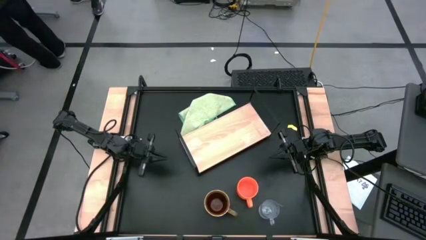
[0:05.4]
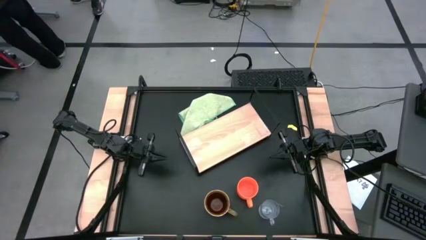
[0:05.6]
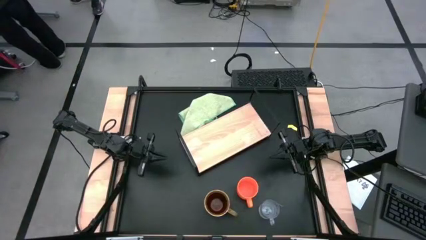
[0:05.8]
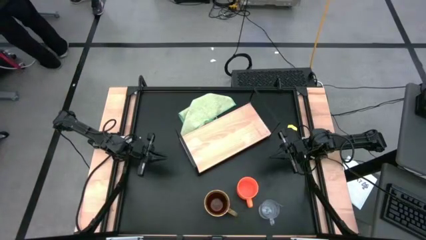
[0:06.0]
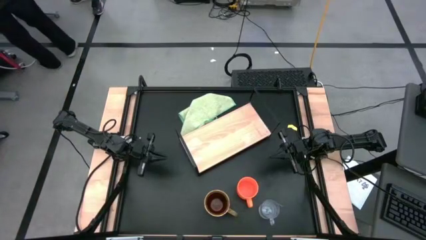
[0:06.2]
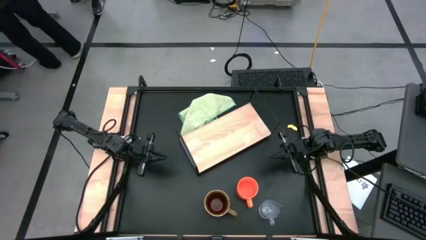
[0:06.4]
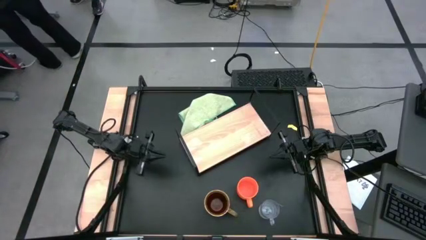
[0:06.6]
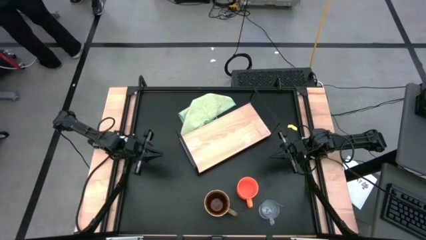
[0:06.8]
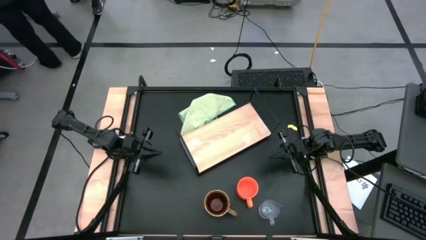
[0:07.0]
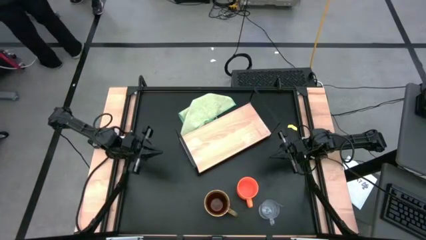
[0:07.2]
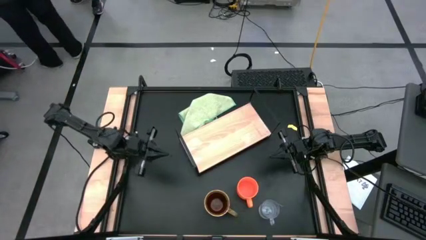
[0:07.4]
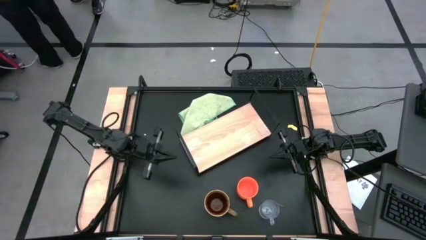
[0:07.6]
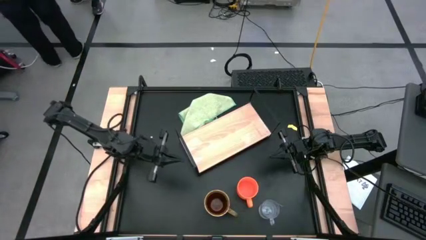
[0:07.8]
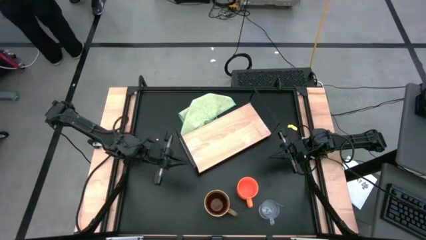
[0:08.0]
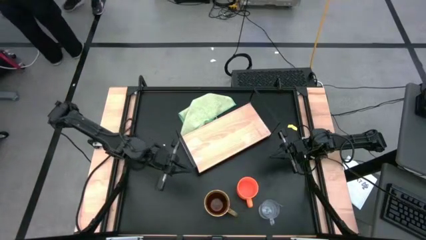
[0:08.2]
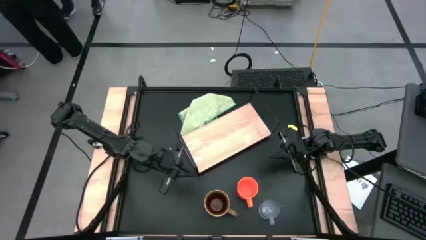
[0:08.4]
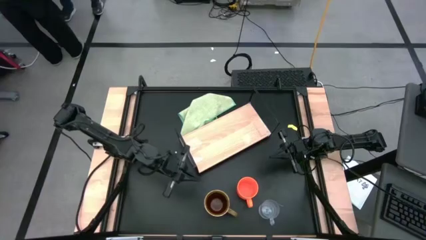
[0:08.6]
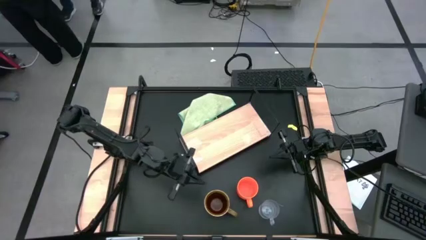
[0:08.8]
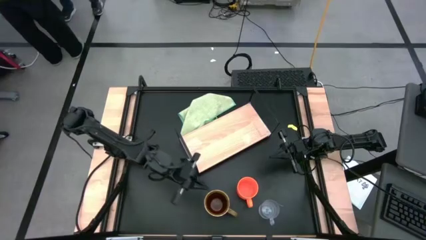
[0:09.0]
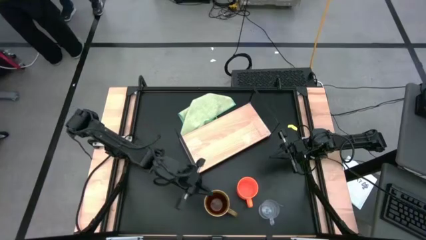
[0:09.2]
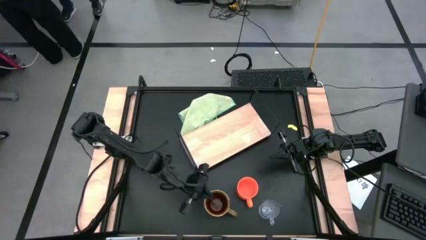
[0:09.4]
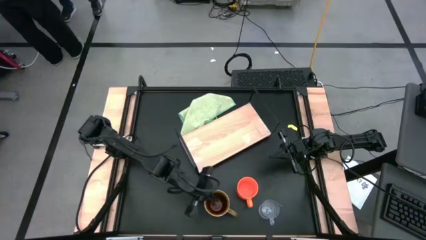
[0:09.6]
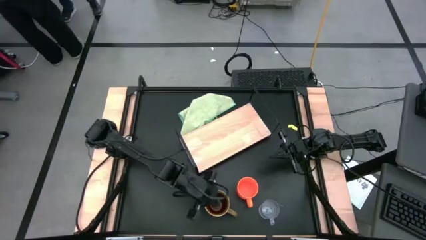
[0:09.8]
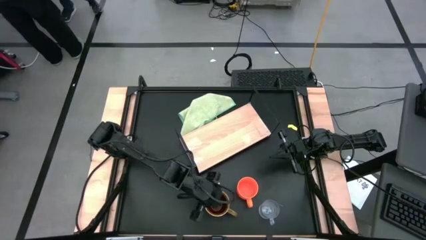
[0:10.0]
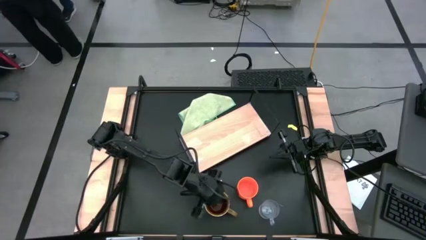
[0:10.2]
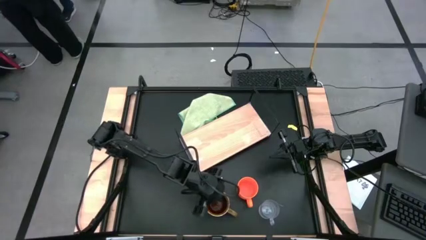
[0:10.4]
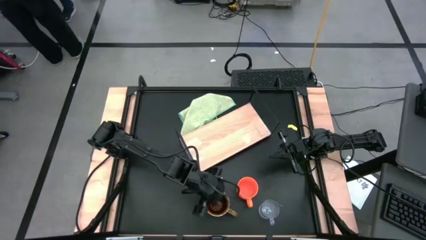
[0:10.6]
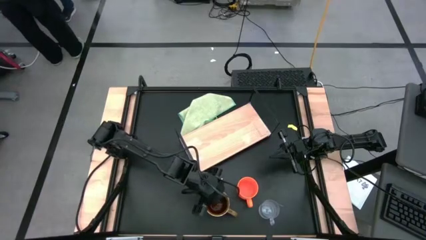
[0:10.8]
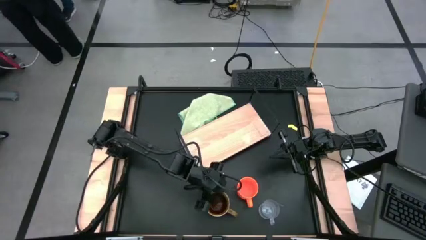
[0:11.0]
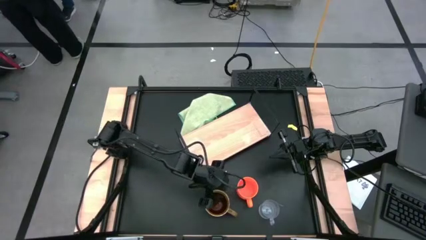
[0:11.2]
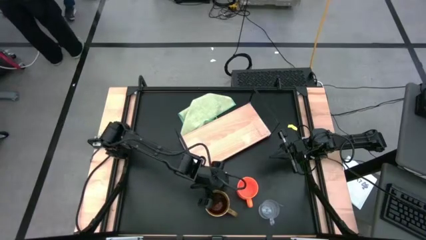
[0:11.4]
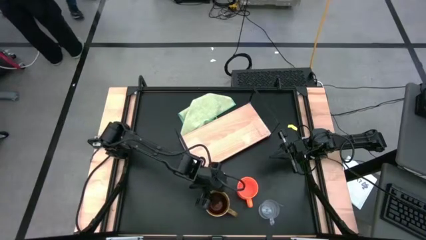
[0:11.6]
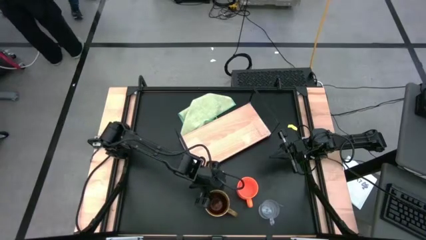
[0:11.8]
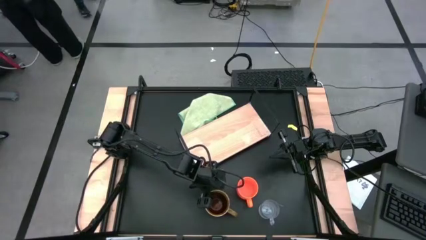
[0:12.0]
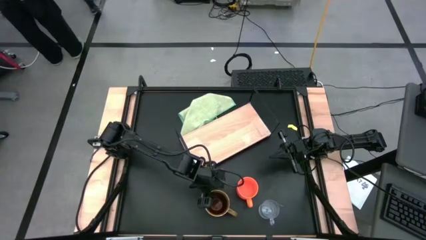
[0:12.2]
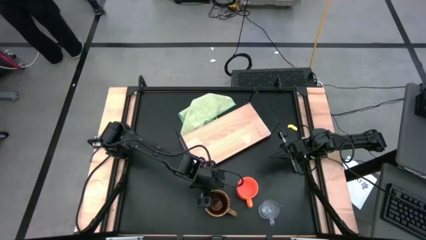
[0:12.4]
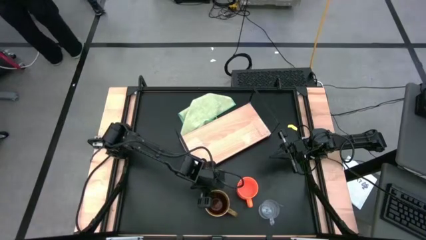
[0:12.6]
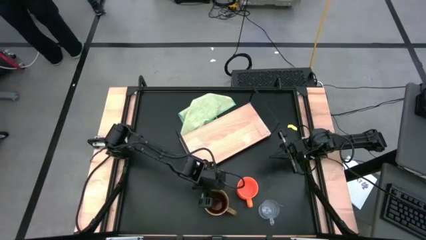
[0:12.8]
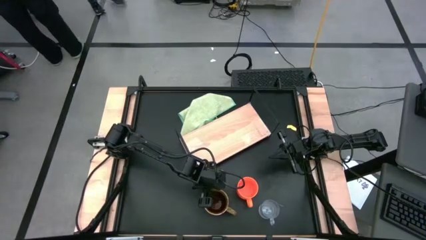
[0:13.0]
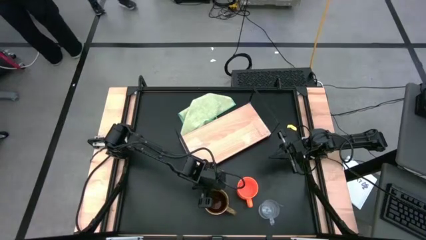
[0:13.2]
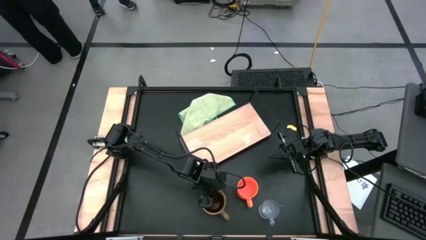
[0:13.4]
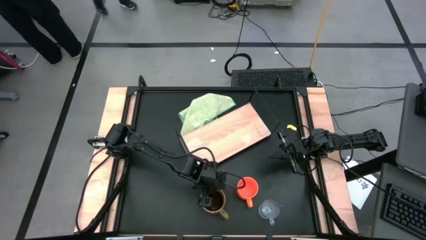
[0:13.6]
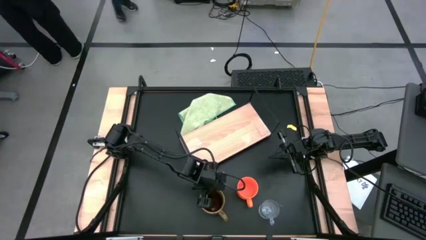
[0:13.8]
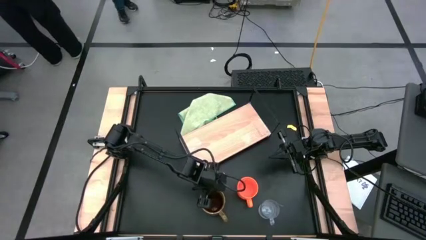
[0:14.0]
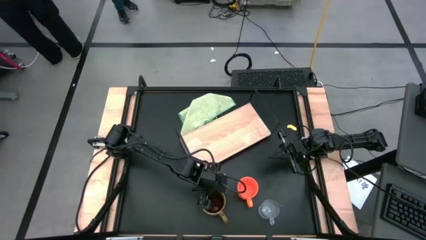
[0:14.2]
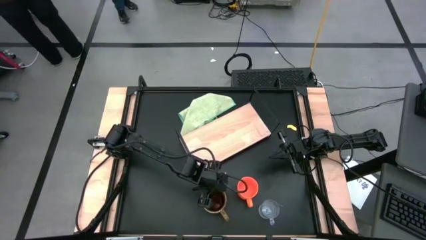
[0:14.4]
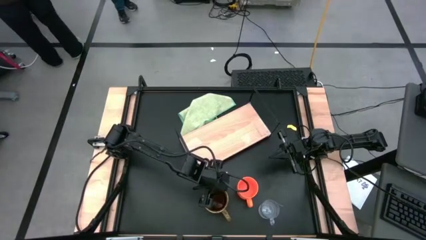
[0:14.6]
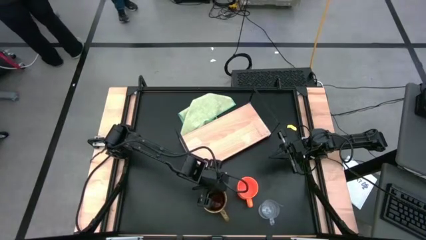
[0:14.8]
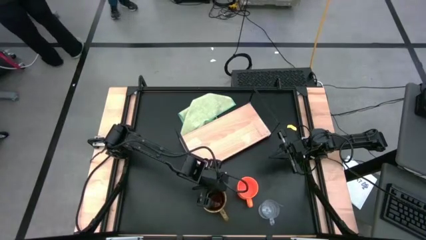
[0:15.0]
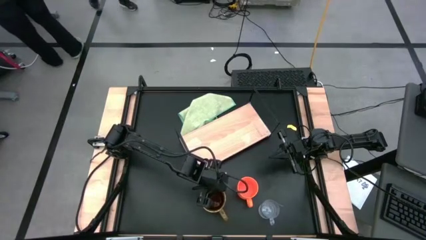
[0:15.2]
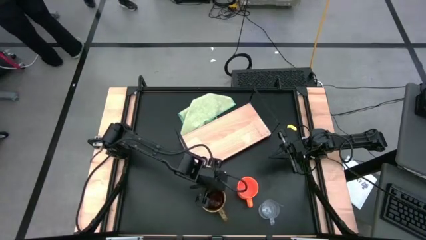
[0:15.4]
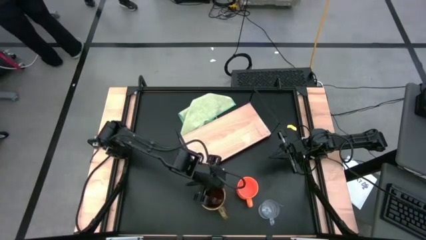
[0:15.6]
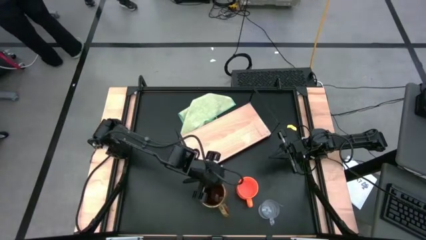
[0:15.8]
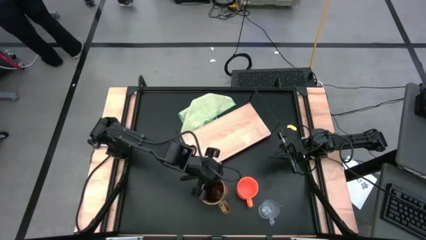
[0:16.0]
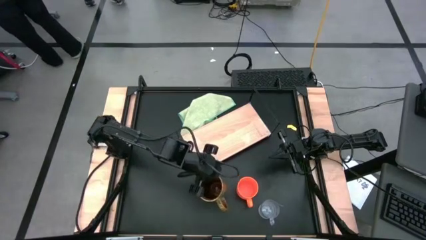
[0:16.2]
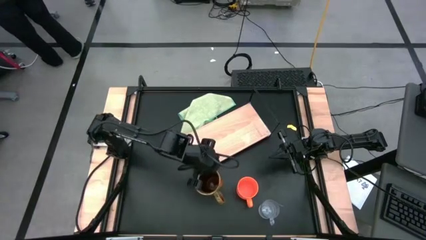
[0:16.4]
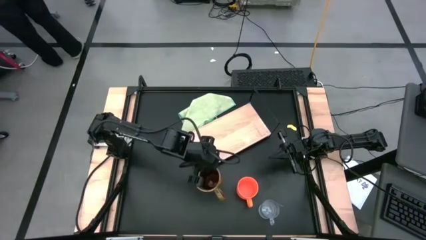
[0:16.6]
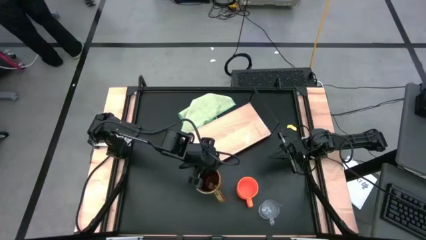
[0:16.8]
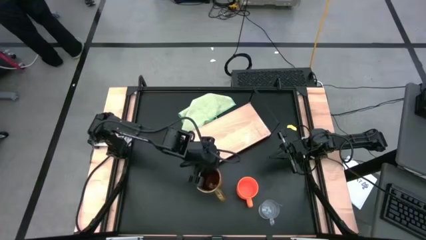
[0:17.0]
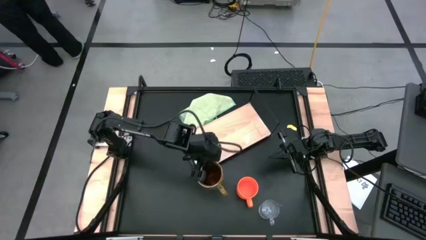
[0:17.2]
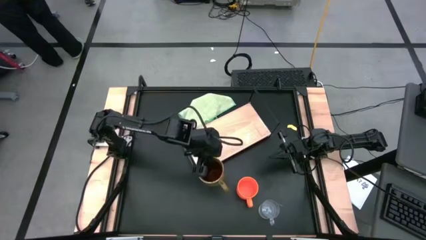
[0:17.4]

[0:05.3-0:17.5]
Task: Stack small to large cups/mugs on shelf
Put the green mug on the shelf

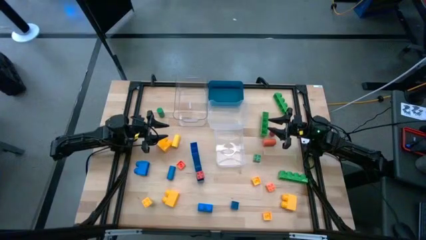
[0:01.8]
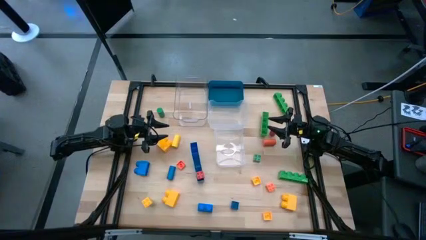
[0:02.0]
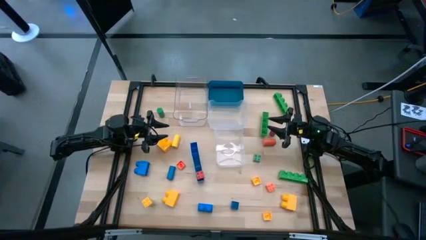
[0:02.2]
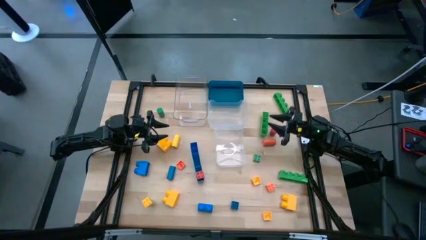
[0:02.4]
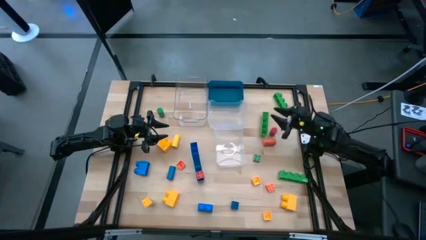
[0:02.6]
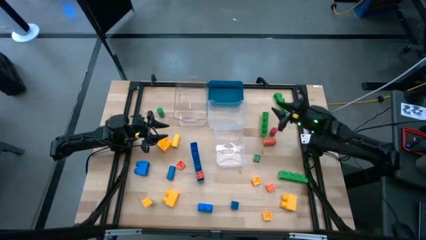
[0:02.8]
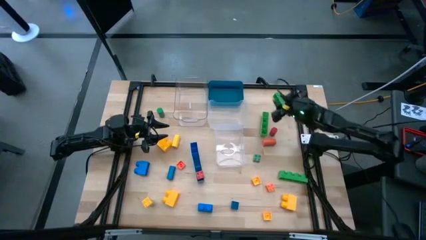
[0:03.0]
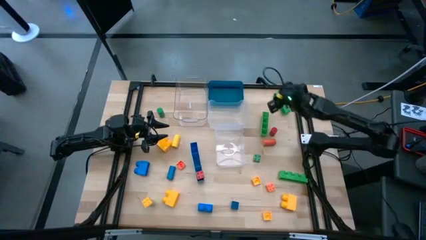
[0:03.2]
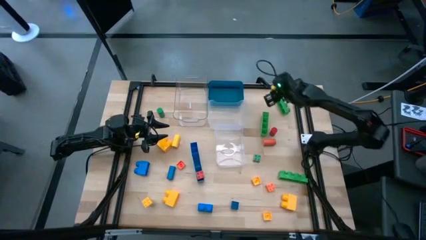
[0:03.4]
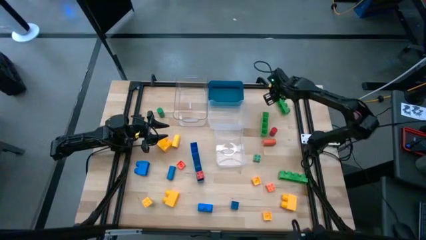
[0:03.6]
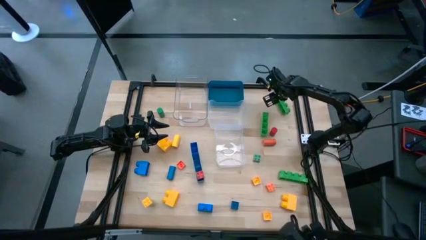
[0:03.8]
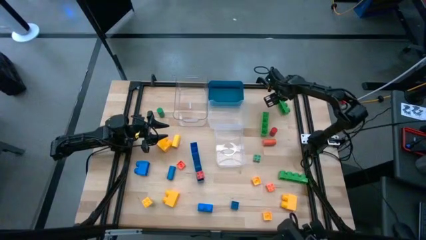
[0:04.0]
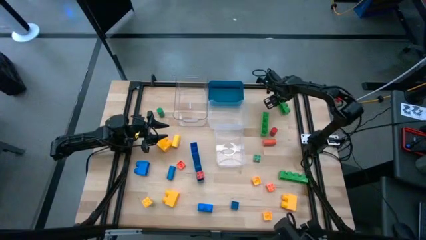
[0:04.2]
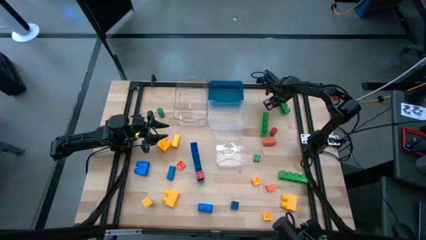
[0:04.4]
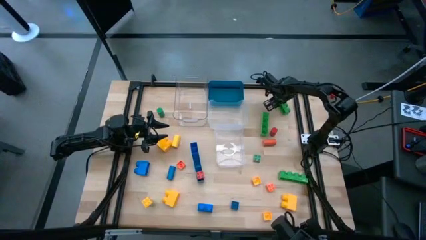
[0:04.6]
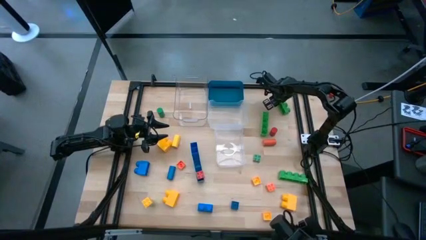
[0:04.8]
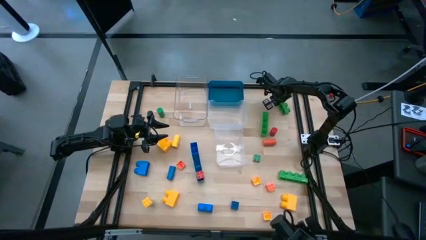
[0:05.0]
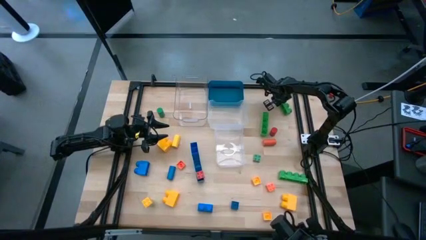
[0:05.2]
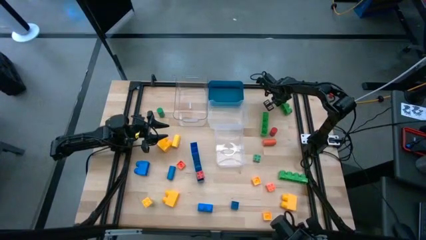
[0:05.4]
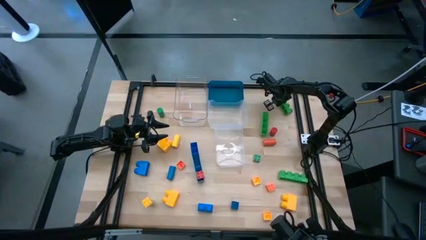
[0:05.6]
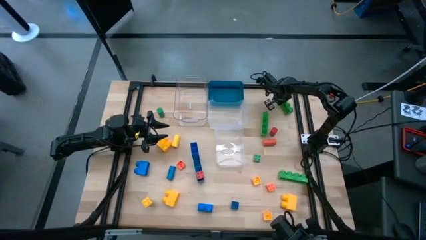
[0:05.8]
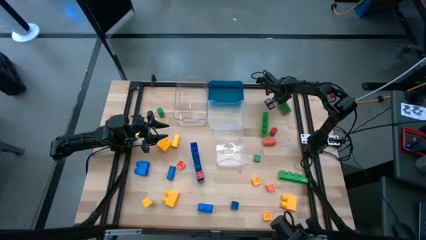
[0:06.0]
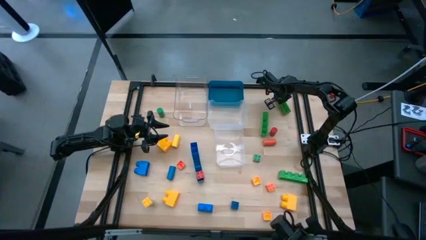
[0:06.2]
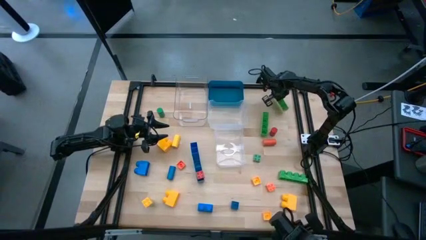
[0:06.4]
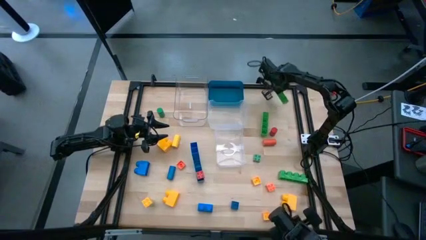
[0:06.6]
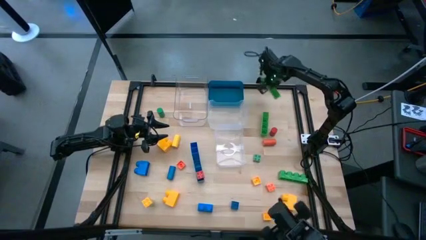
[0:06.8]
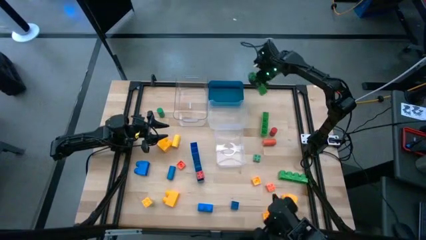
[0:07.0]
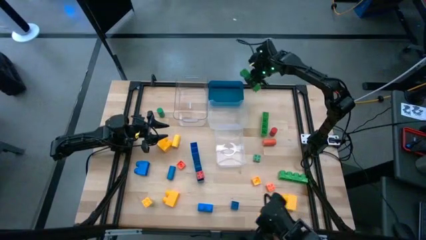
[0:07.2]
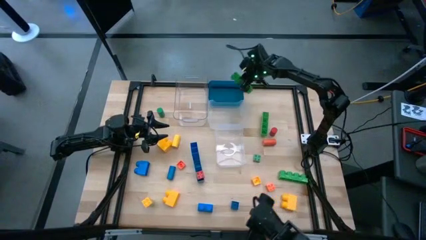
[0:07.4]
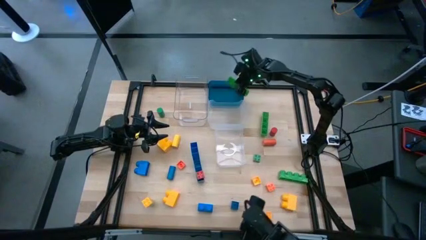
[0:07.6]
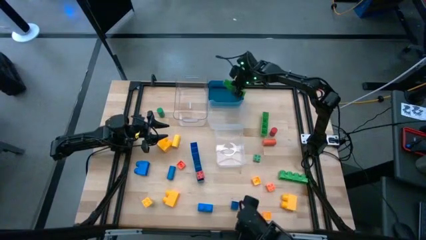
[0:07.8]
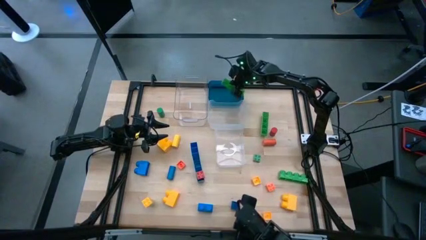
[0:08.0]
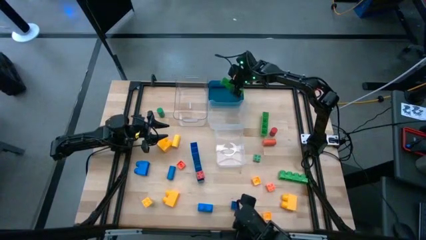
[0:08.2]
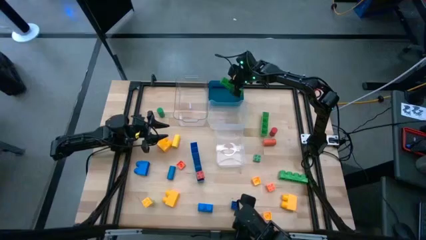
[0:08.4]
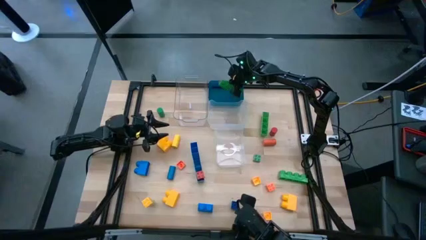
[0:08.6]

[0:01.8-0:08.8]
Task: Sort blocks by size
Put the green 4 stud large game piece into the blue bin
